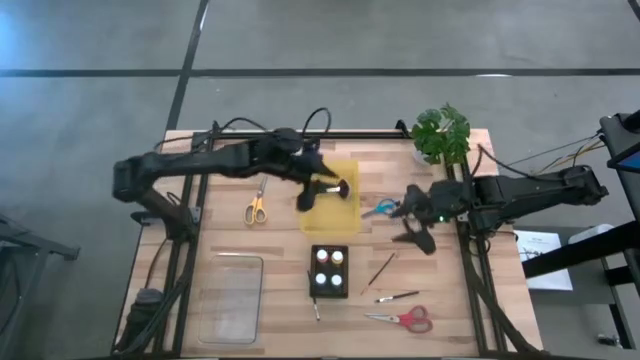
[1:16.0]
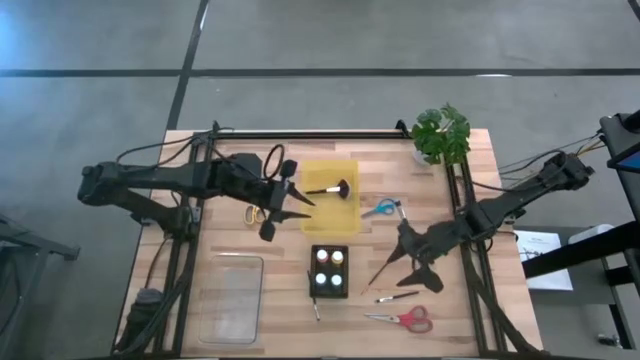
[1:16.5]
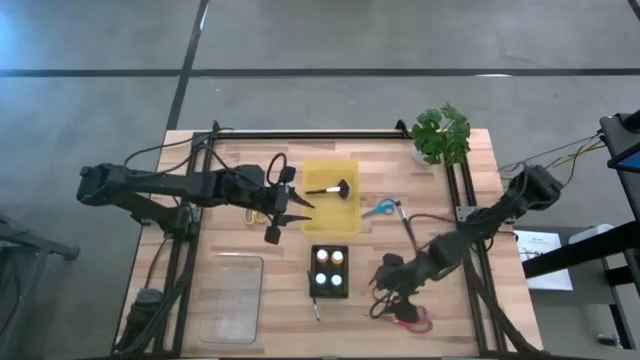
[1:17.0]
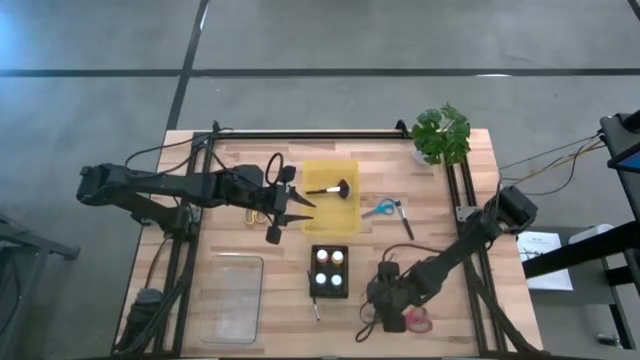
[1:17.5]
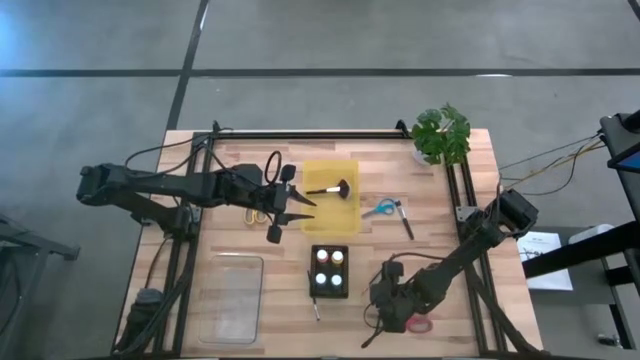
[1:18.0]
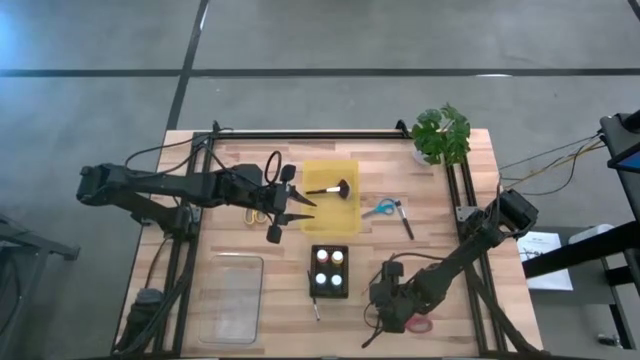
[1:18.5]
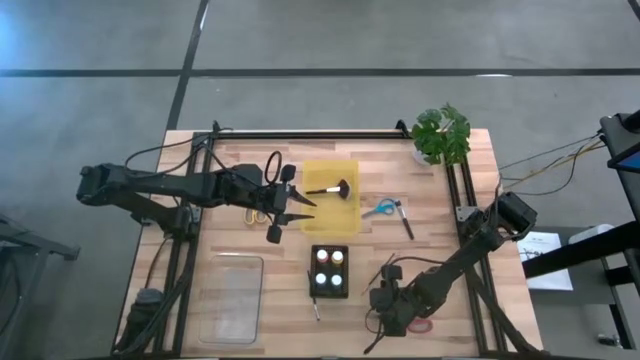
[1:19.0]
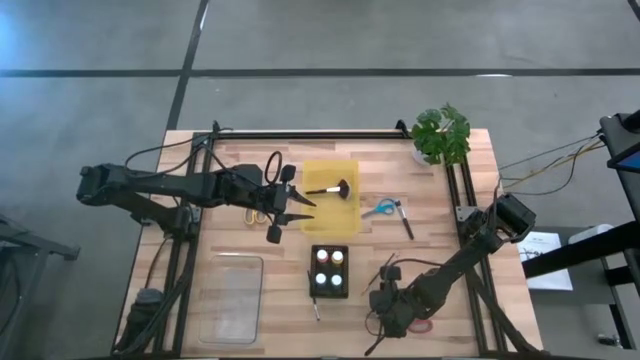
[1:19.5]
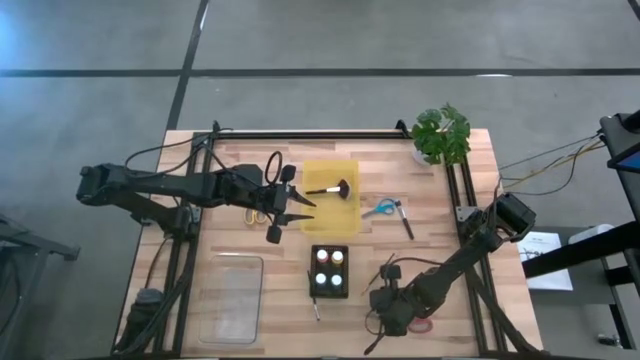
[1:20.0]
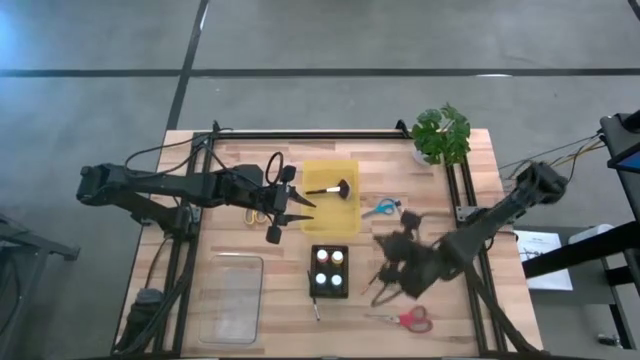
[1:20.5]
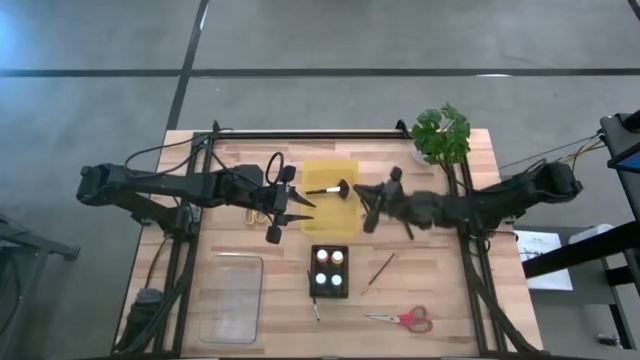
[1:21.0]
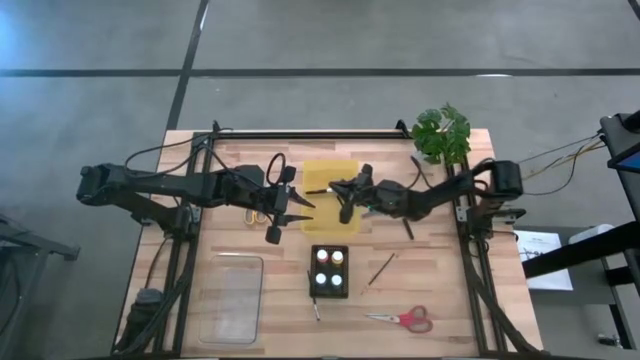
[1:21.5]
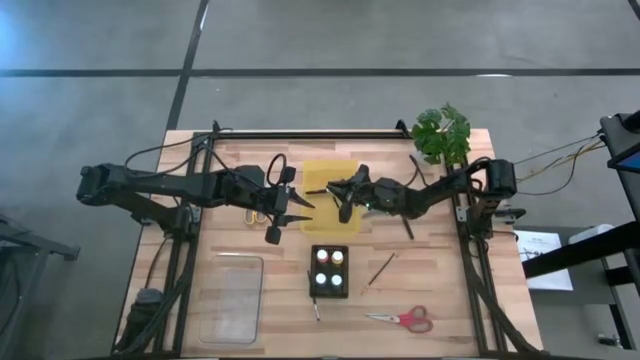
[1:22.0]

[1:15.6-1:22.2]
Task: Pick & Place Paint Supplies
Put the bottom right silver eyeshadow brush into the yellow bin

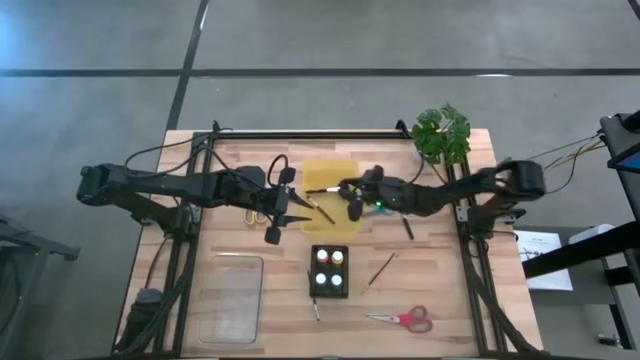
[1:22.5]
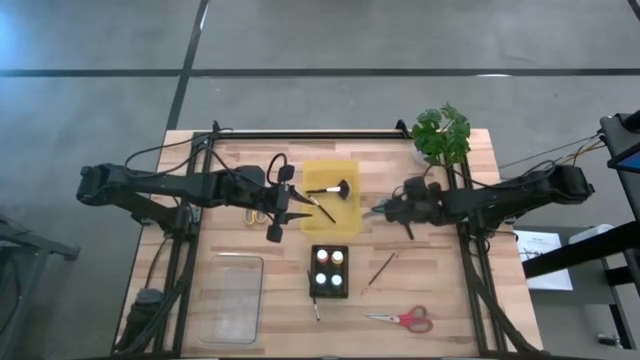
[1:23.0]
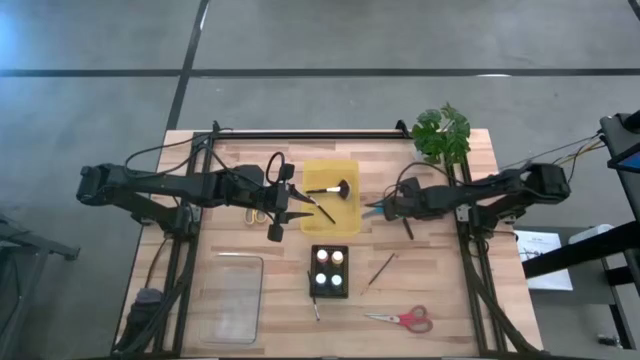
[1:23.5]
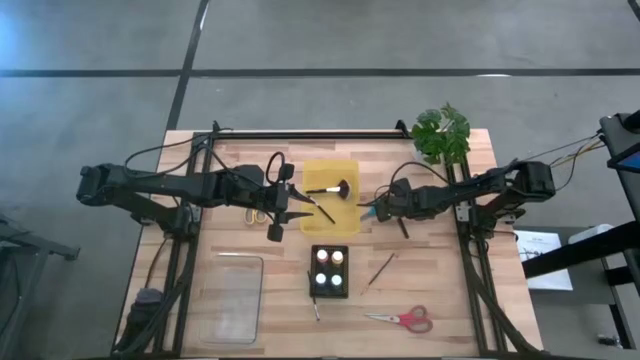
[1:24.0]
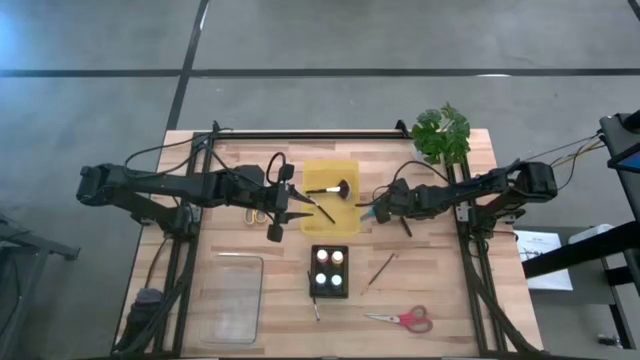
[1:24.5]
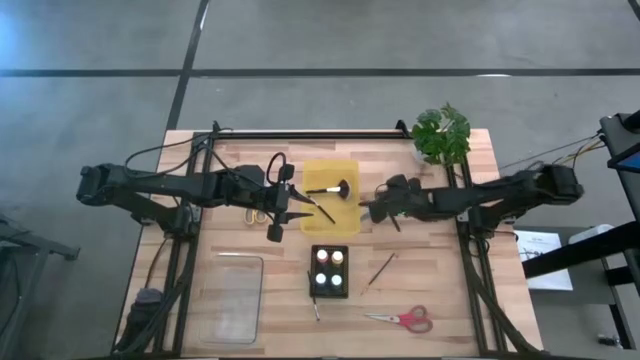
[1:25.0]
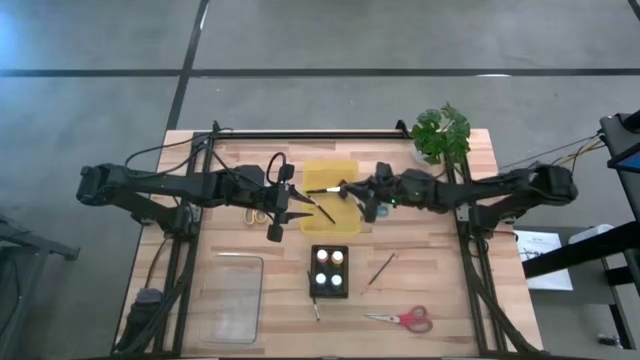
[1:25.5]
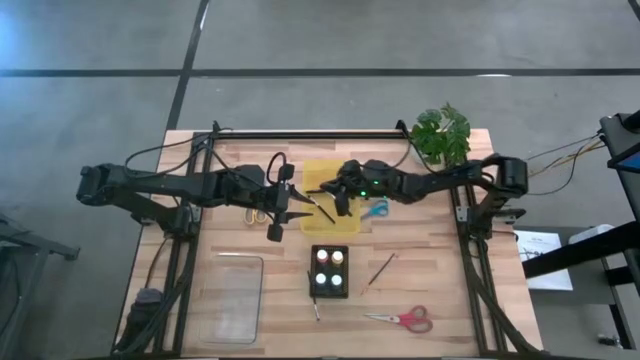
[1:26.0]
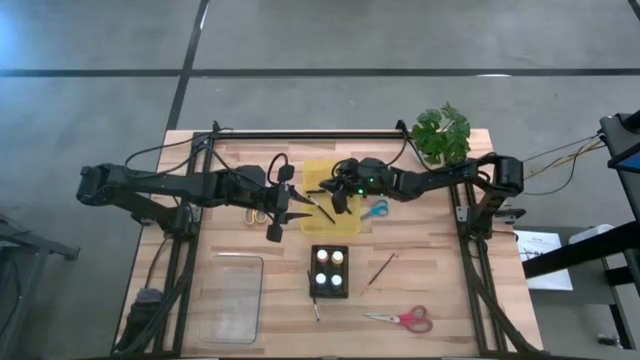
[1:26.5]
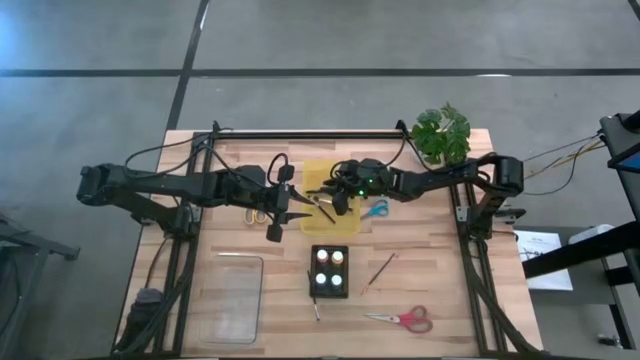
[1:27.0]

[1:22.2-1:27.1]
Put the top silver eyeshadow brush into the yellow bin

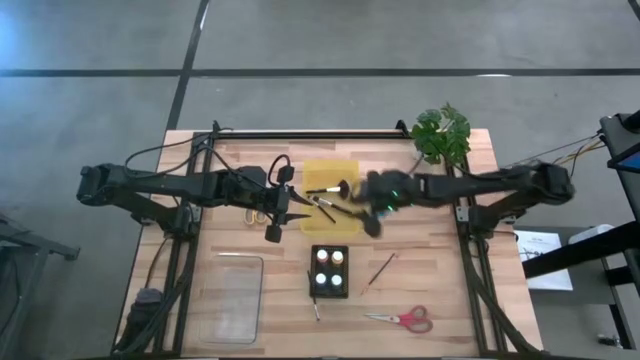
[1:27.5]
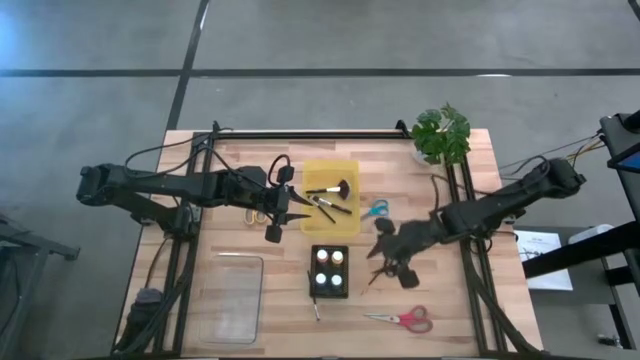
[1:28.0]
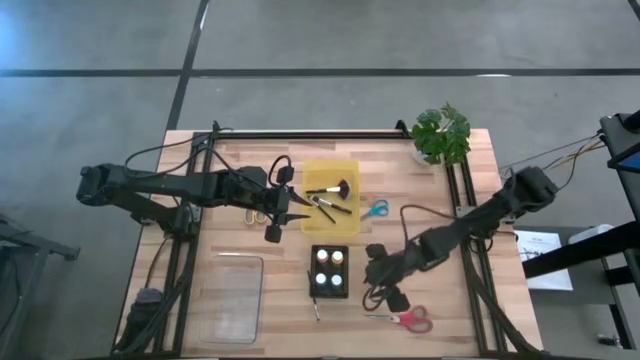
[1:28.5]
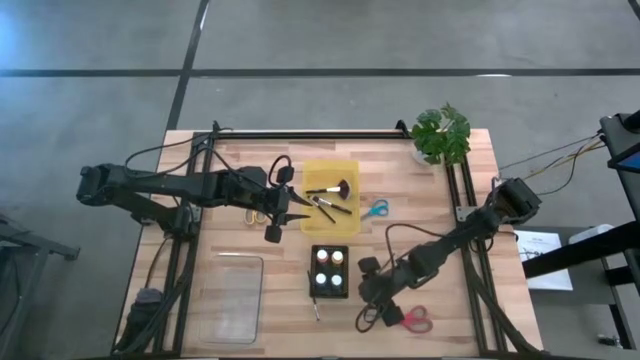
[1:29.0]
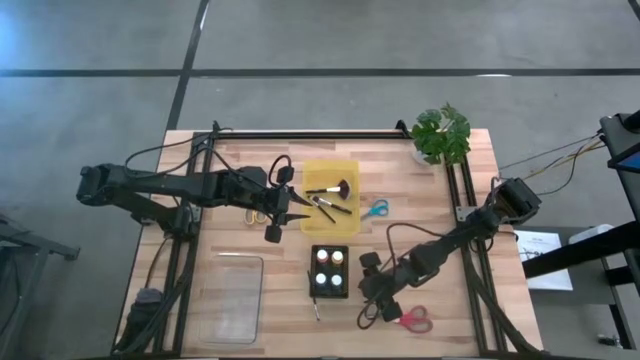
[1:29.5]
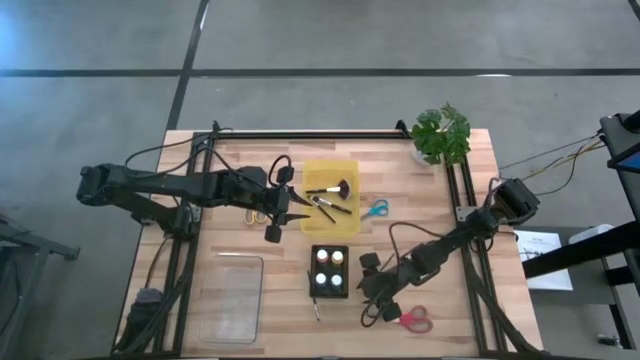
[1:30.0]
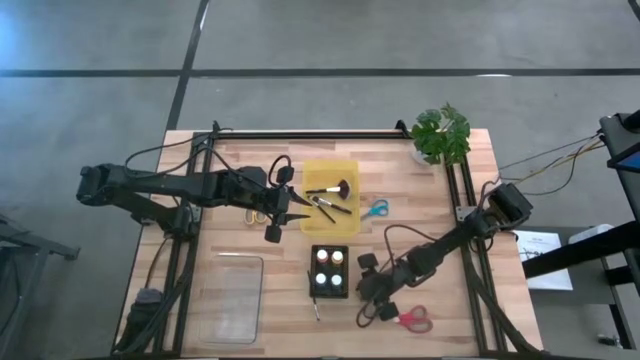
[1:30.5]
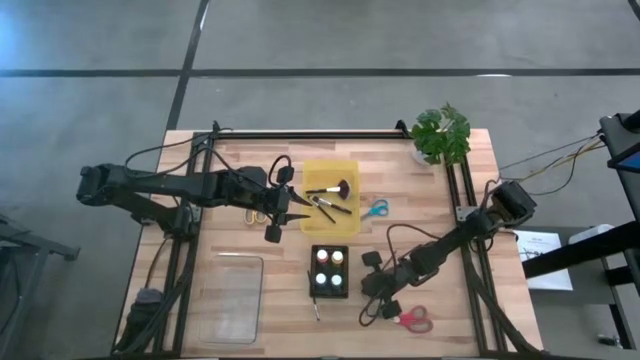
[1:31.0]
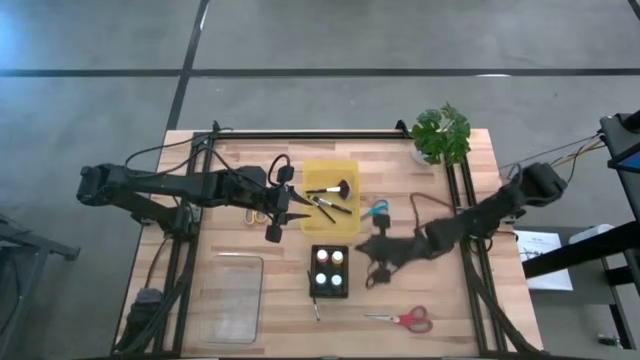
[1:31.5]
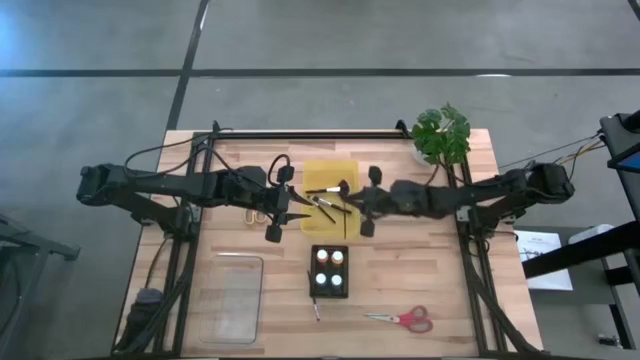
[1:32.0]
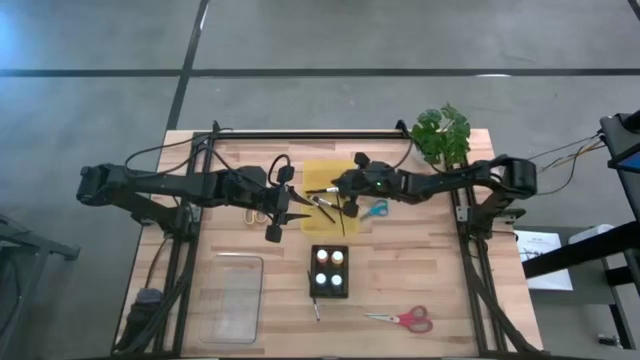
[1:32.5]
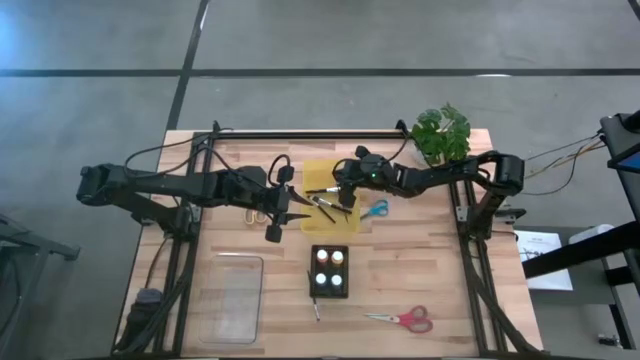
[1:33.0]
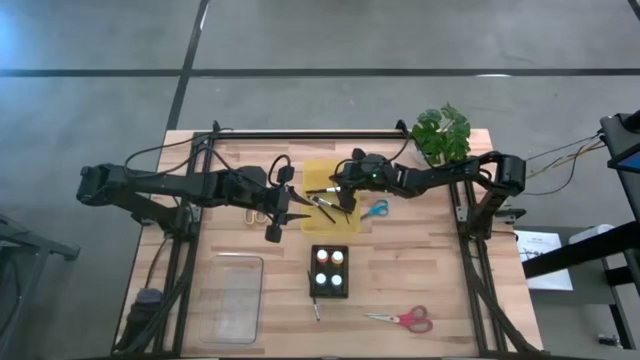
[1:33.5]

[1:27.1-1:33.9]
Put the gold paintbrush into the yellow bin

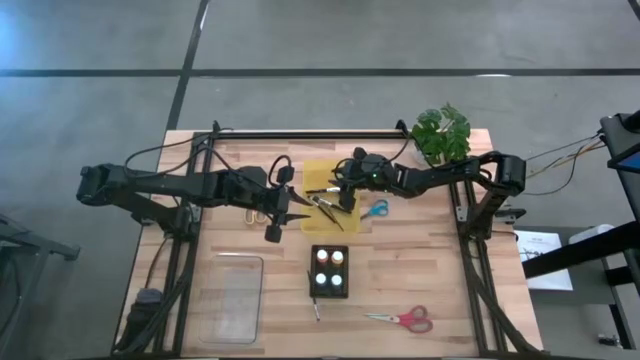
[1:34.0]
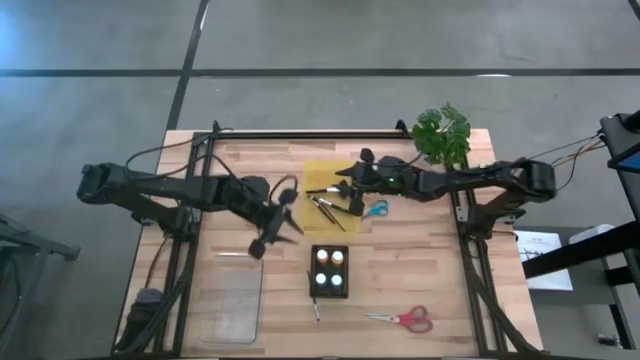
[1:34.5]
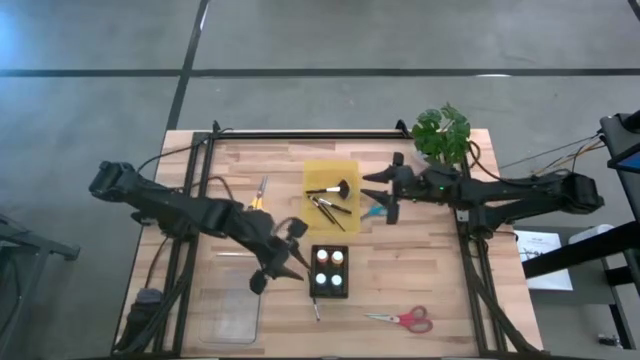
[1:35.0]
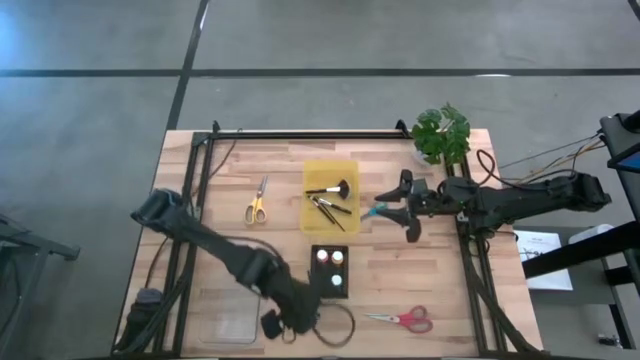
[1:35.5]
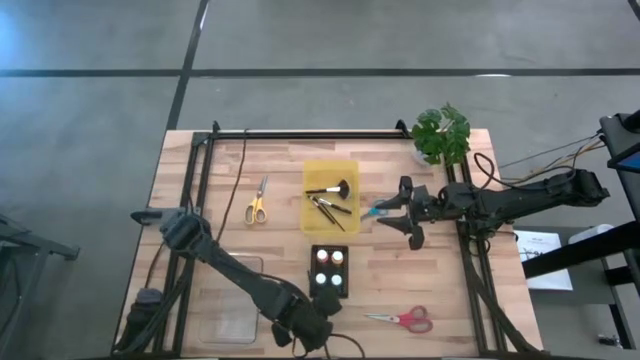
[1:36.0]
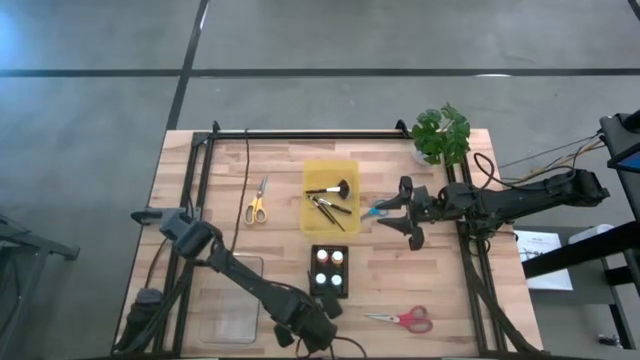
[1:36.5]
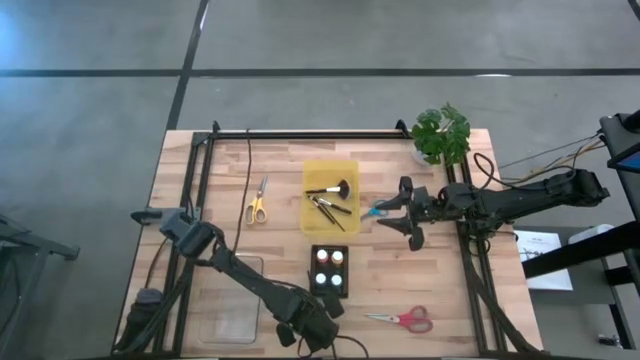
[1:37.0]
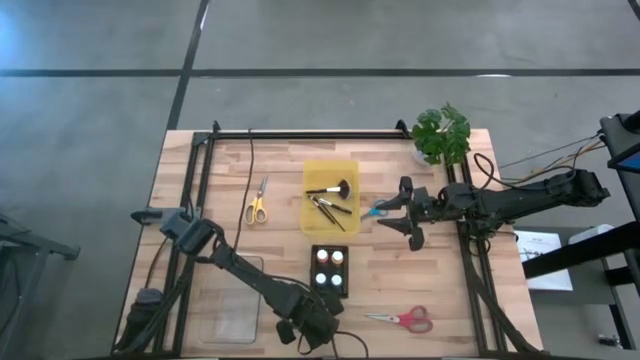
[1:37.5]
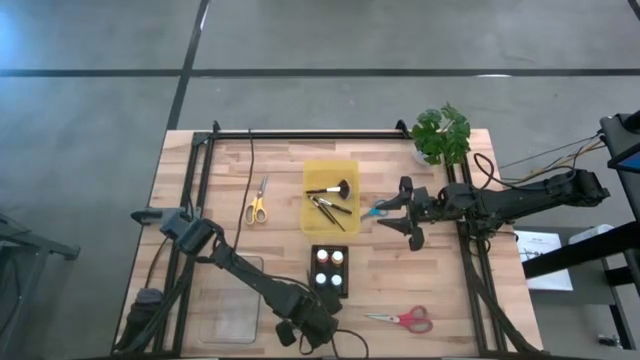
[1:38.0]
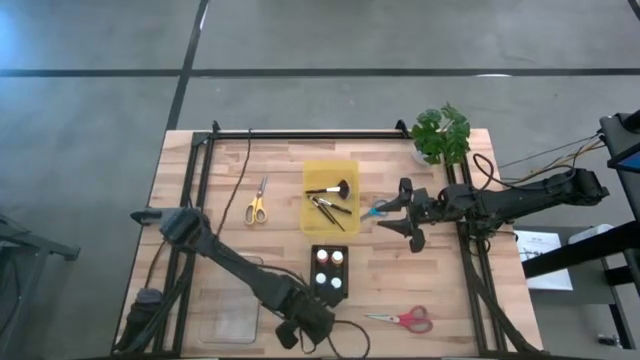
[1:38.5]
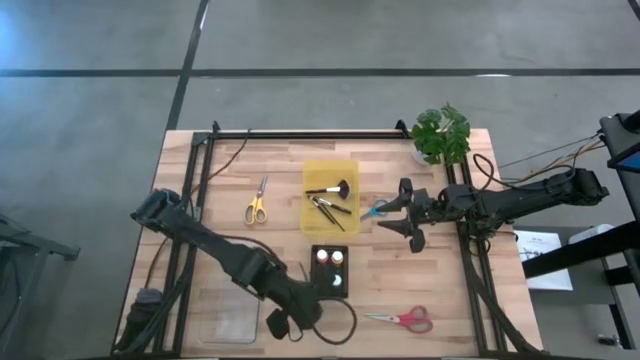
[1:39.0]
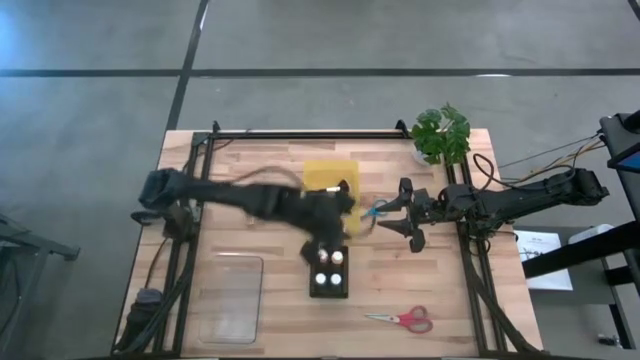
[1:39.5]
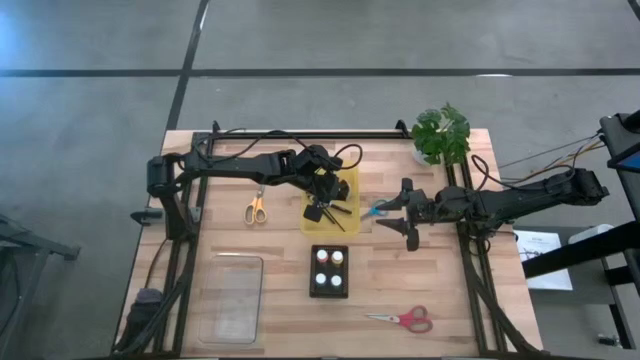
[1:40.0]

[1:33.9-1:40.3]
Put the silver eyeshadow brush into the yellow bin
